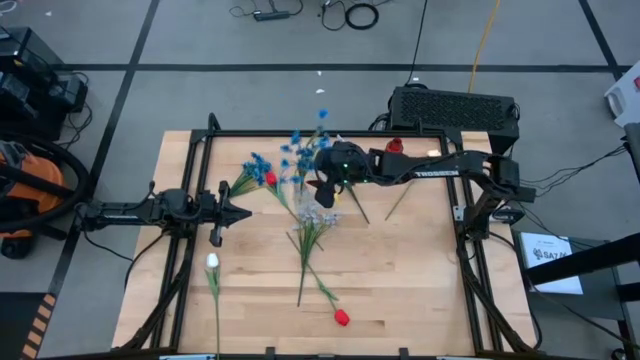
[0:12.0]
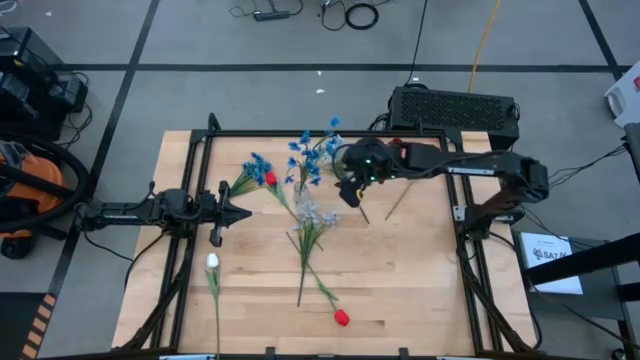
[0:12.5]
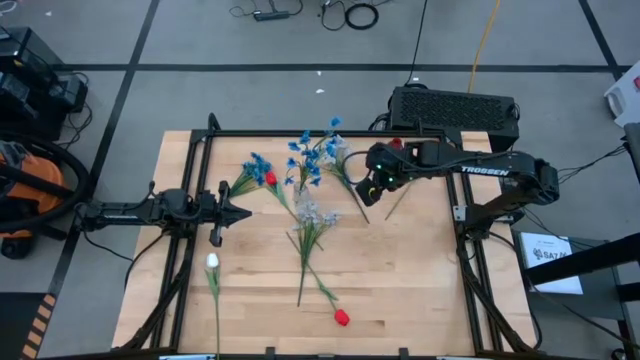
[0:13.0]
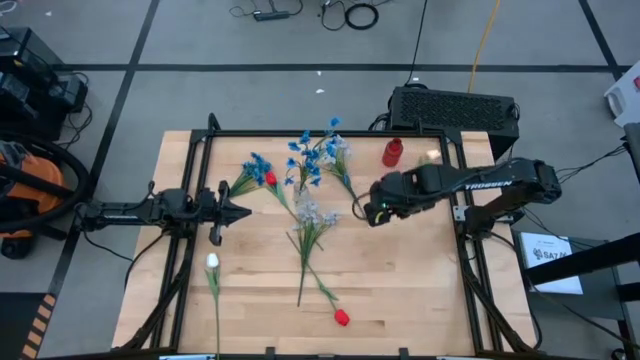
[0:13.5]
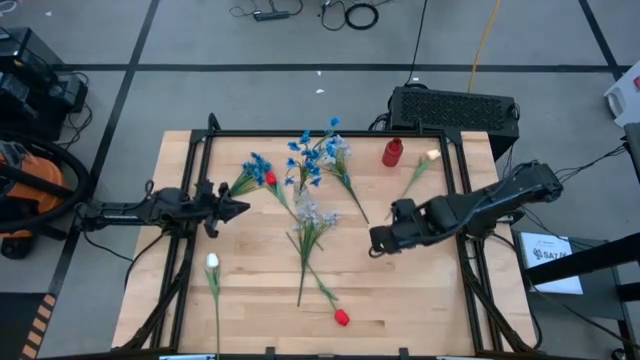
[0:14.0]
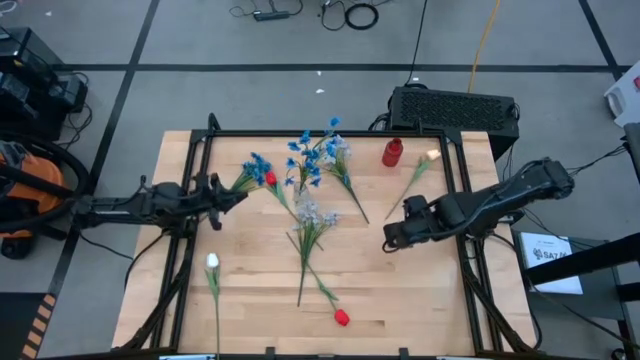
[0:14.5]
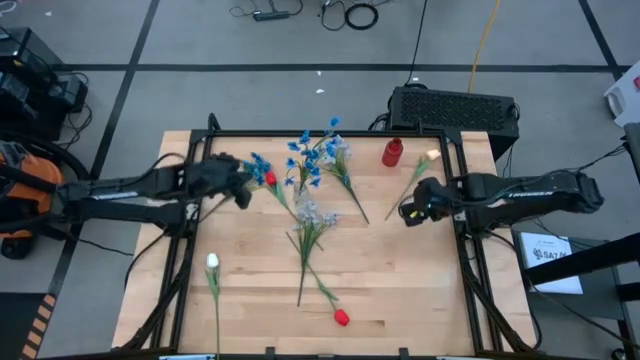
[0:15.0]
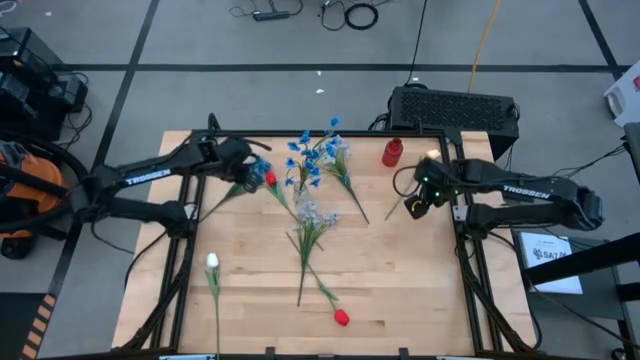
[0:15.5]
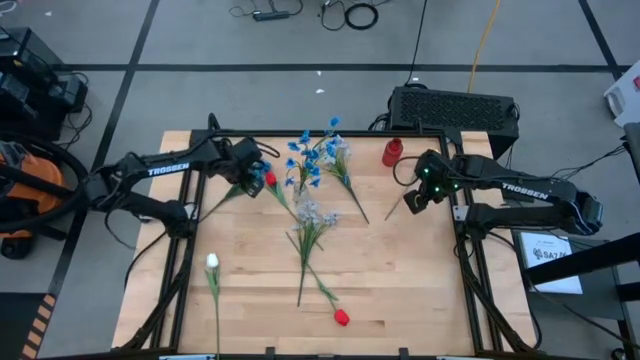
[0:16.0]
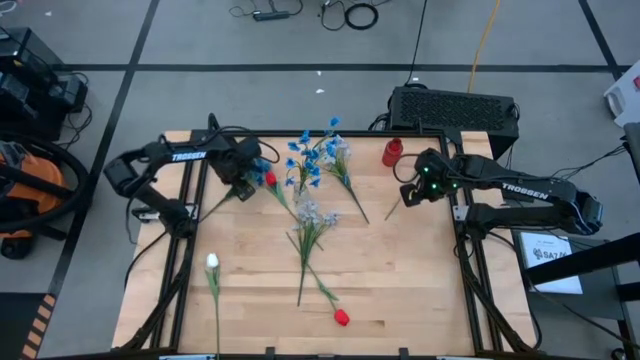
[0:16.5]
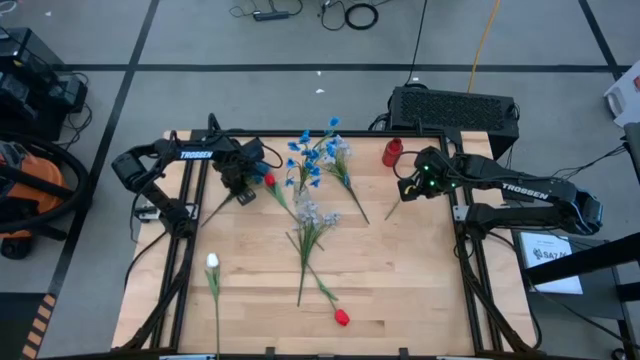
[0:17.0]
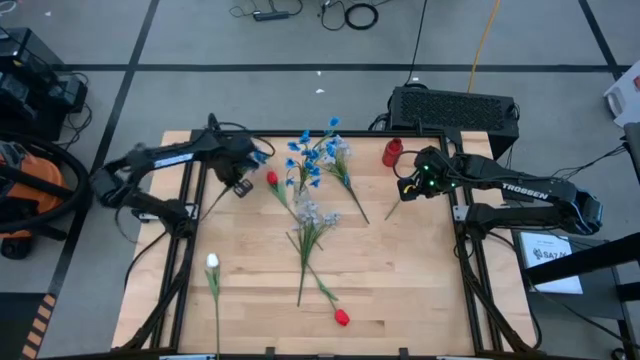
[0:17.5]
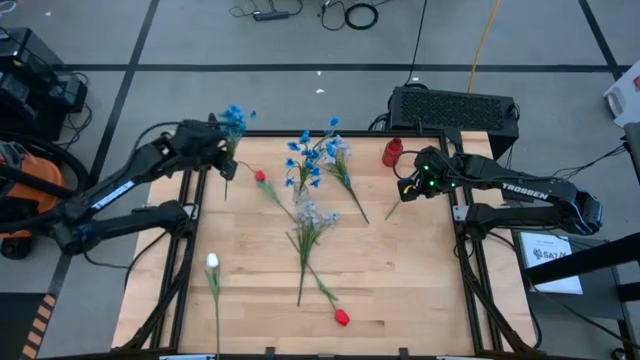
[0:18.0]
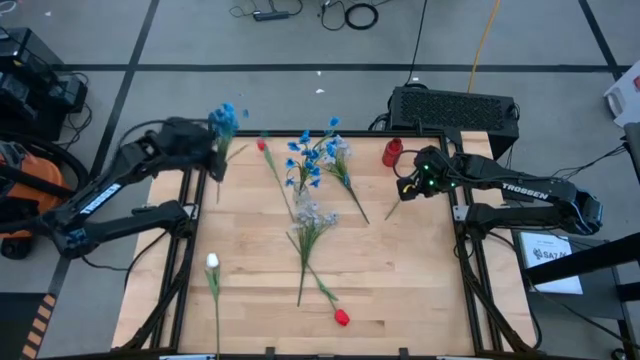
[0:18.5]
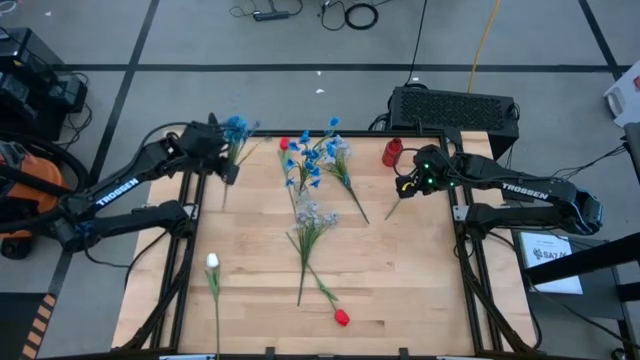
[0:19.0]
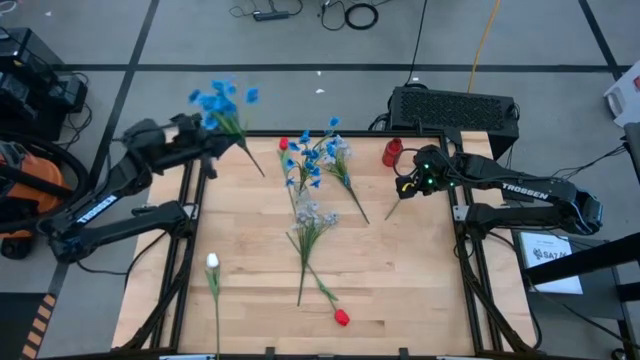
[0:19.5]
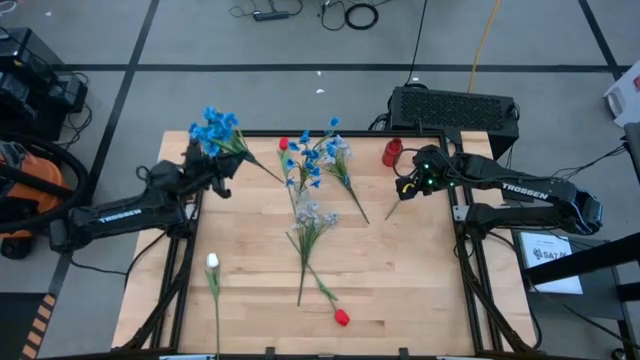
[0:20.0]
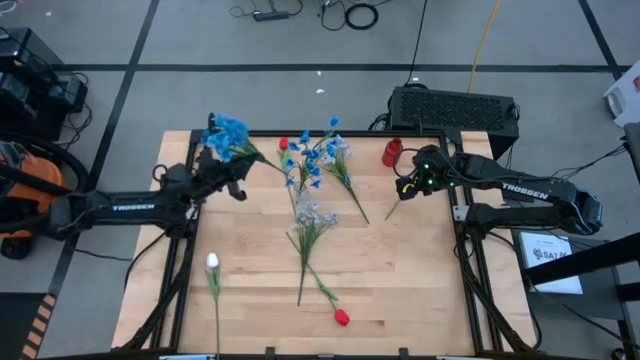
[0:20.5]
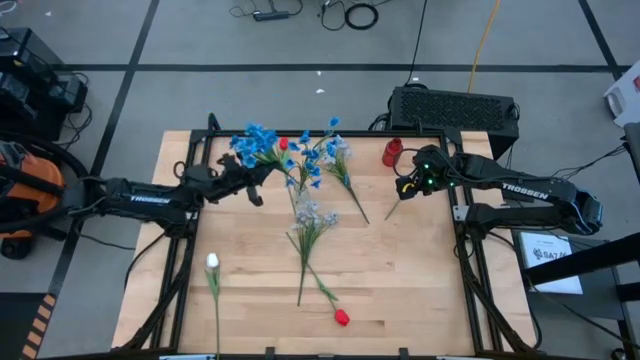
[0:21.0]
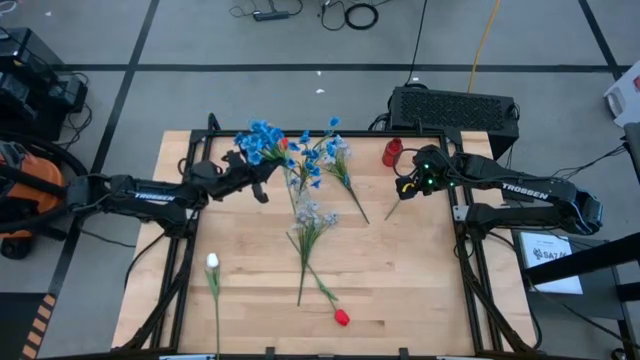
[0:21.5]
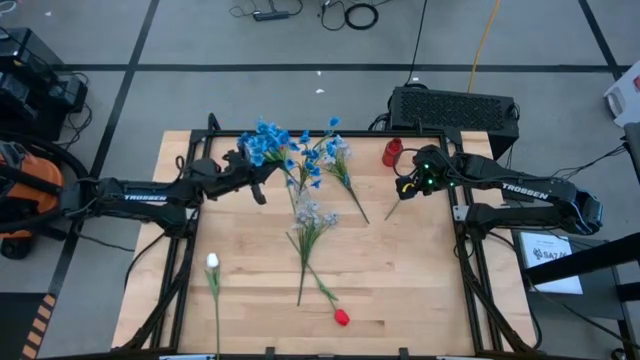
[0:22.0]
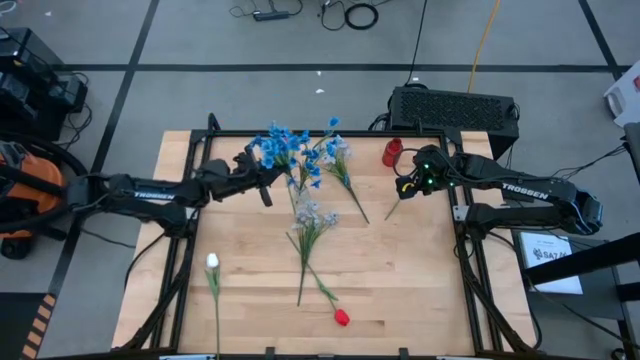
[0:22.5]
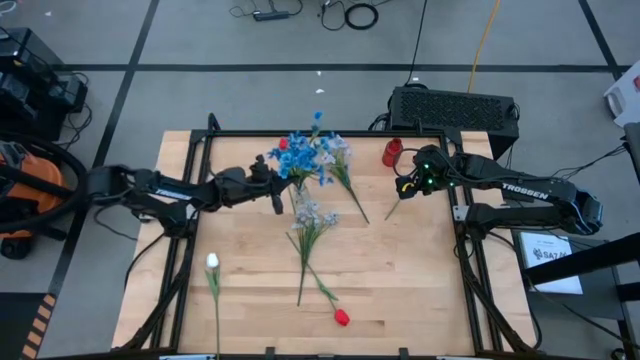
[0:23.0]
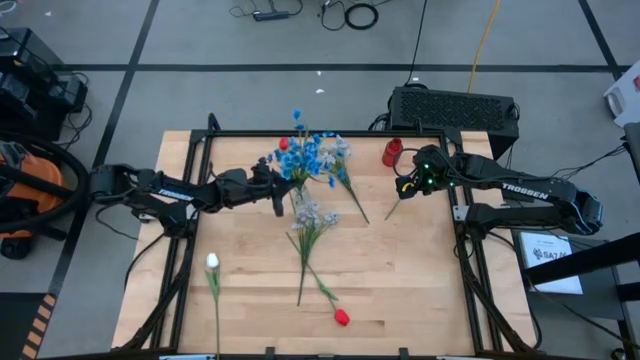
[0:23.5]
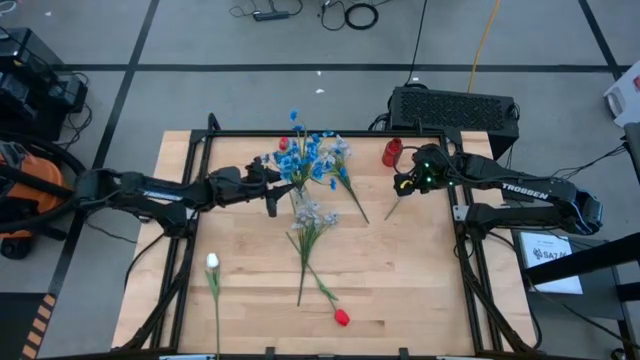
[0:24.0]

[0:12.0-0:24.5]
Task: Sort flowers into vase by color
Put the blue flowers into the transparent vase

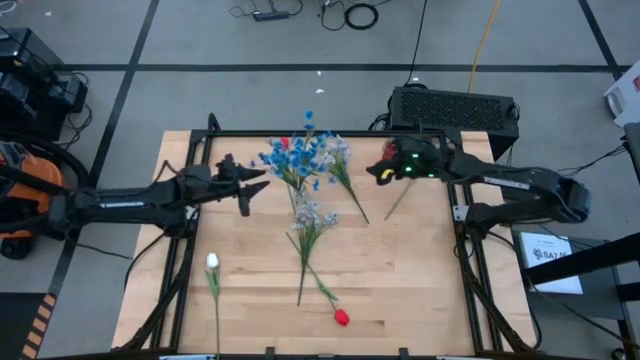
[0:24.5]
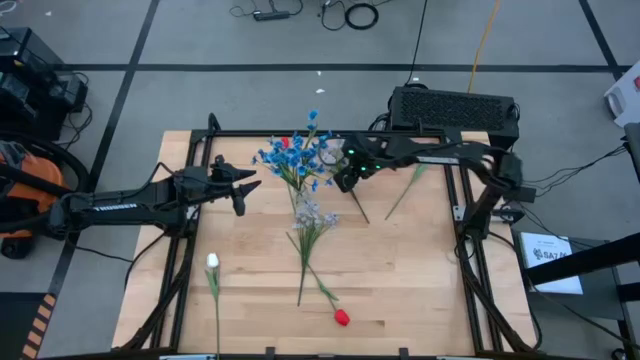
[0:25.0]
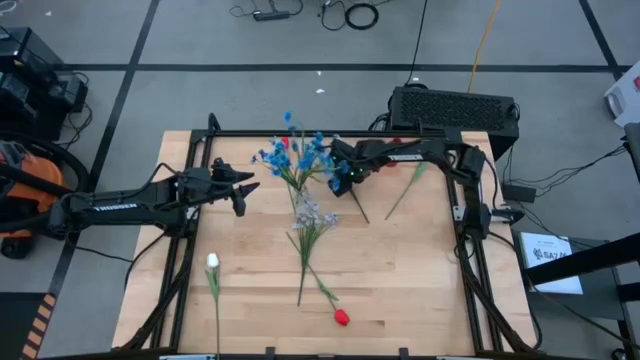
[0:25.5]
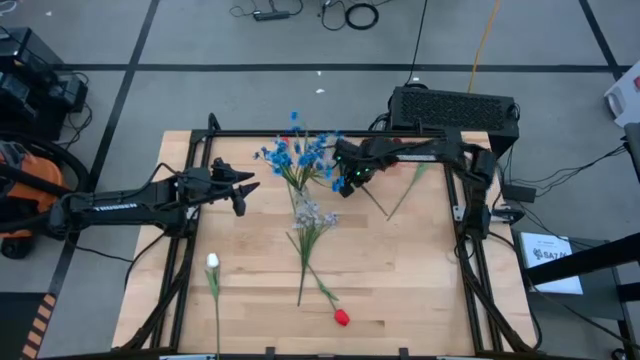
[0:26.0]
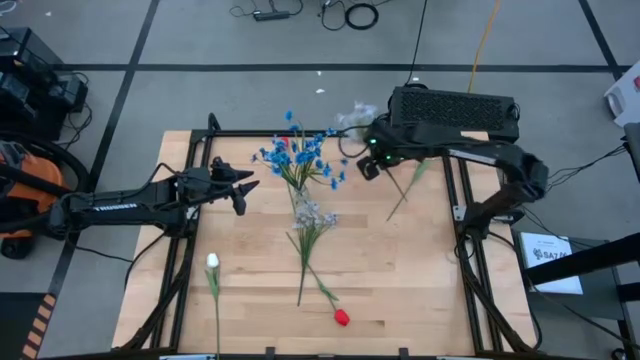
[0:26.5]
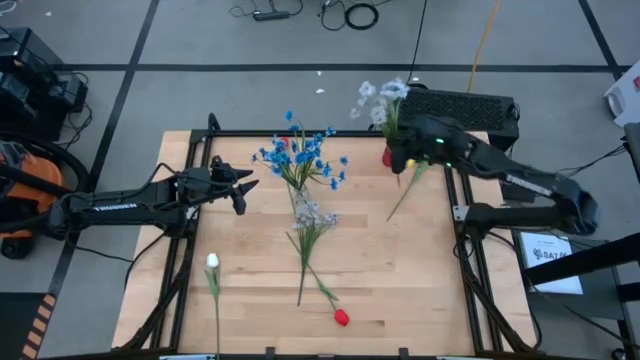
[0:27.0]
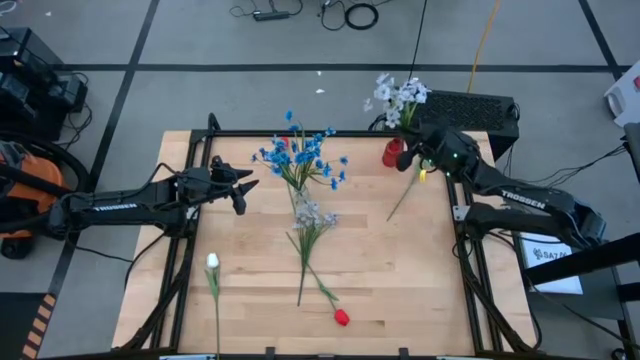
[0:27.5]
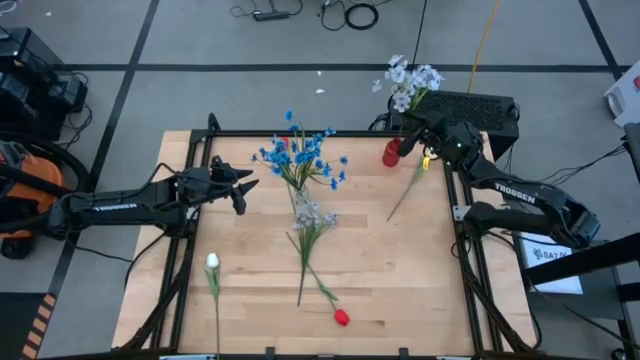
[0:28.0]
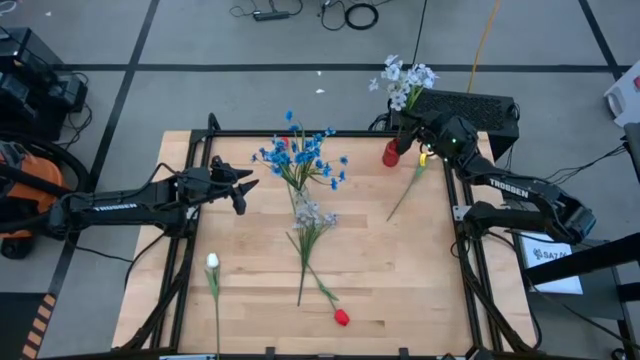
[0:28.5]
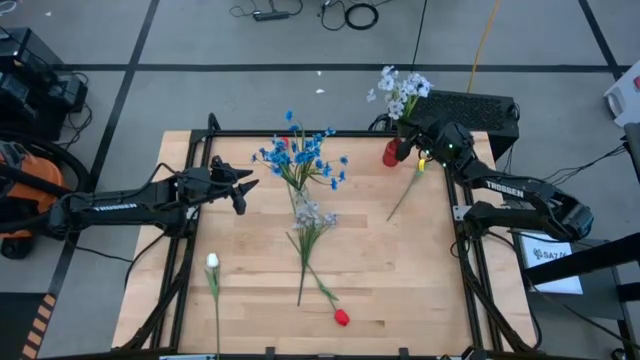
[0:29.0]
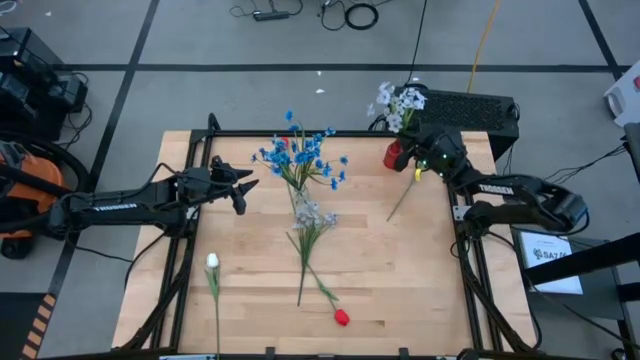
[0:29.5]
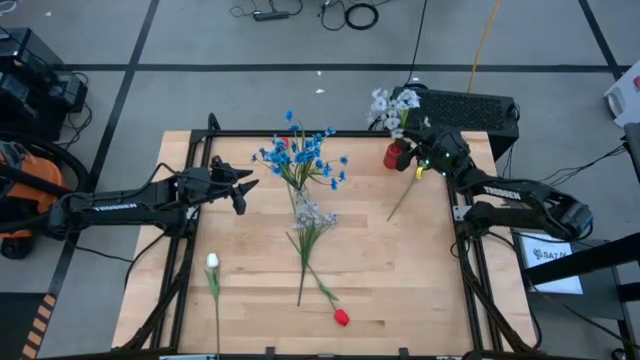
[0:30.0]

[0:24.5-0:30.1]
Put the top white flowers into the red vase
